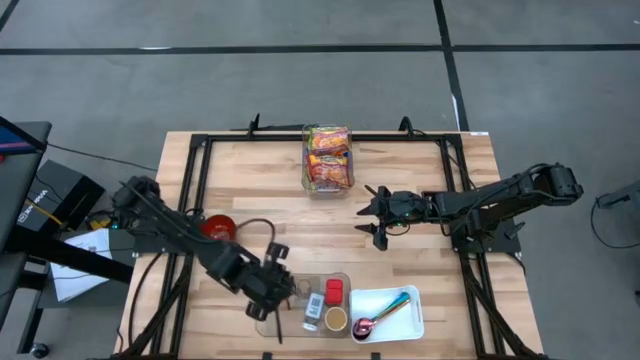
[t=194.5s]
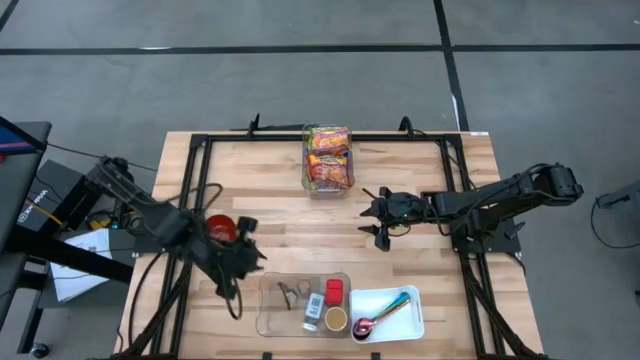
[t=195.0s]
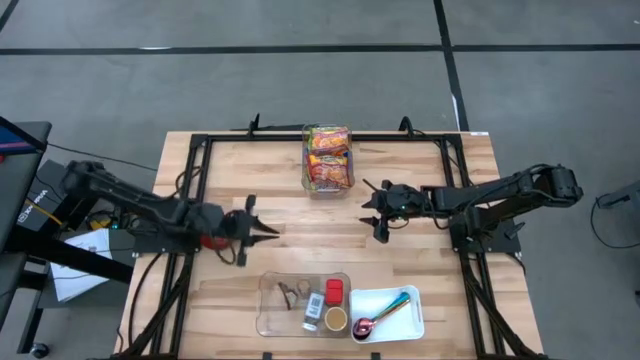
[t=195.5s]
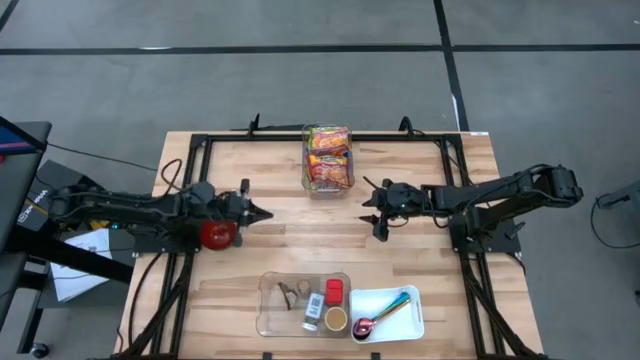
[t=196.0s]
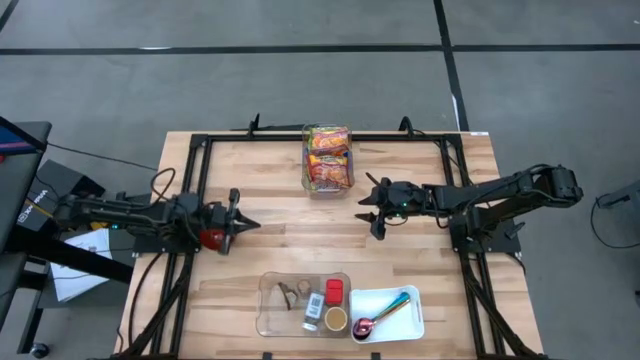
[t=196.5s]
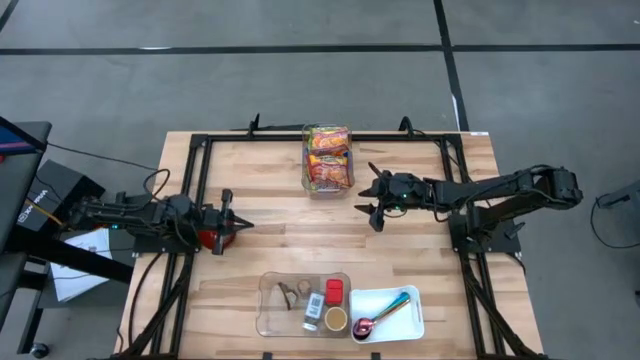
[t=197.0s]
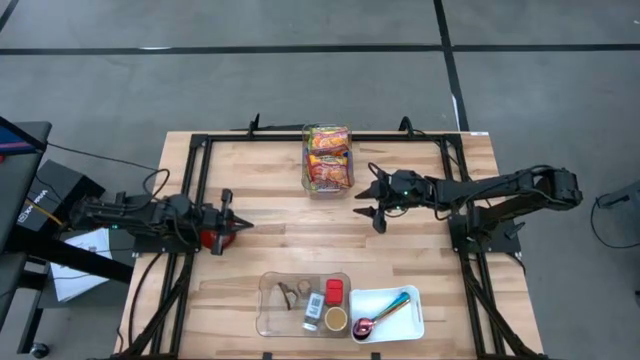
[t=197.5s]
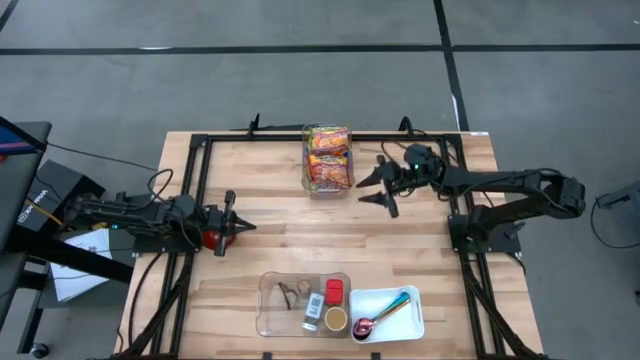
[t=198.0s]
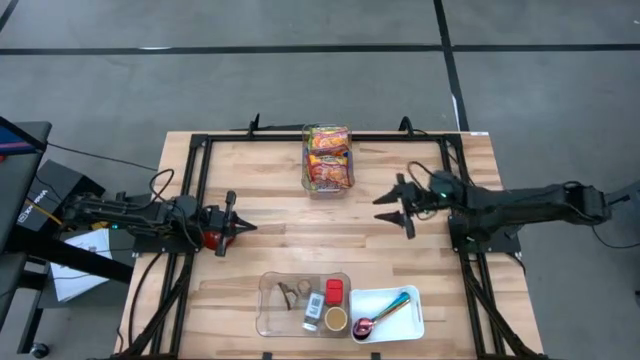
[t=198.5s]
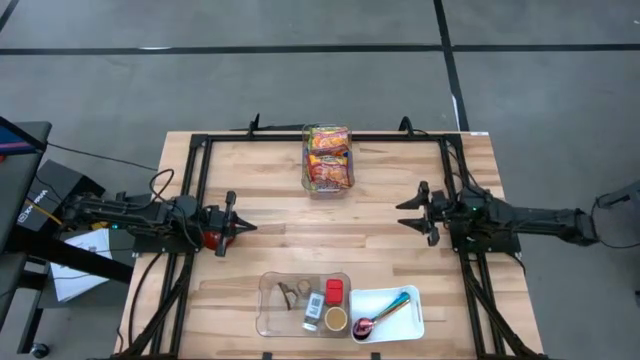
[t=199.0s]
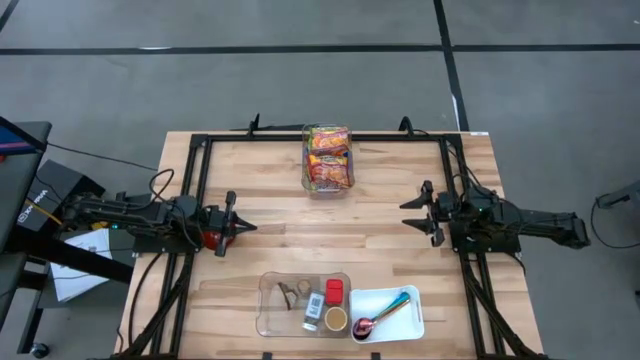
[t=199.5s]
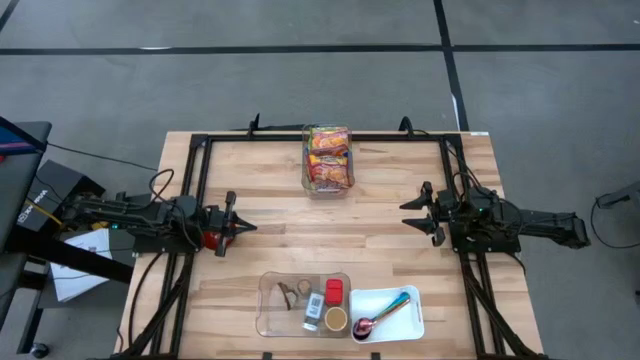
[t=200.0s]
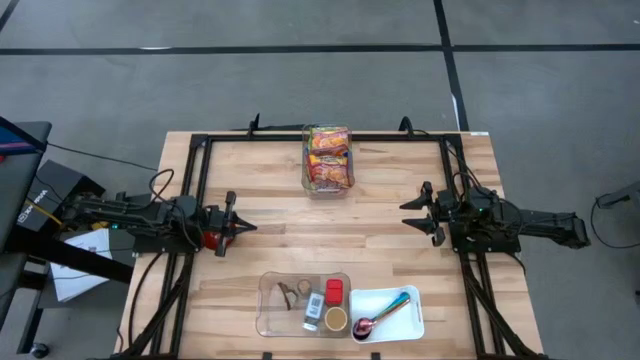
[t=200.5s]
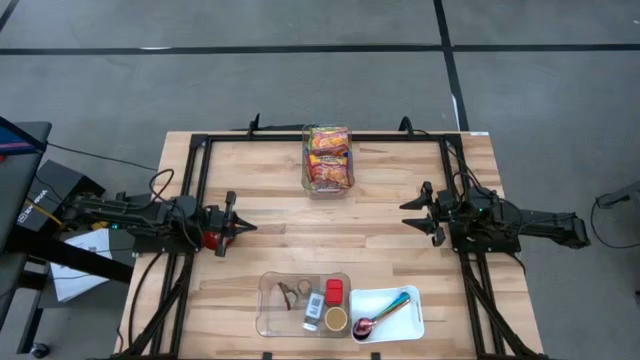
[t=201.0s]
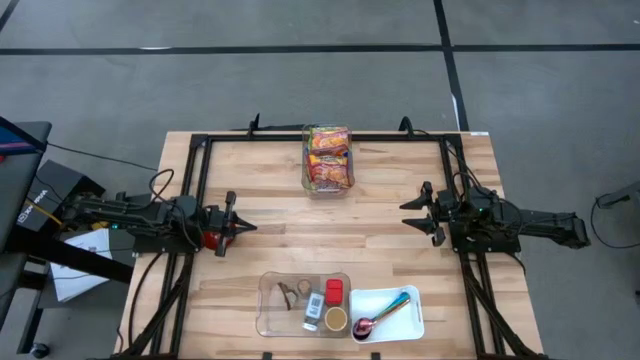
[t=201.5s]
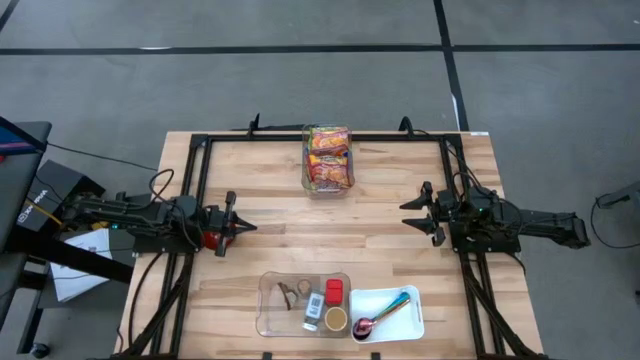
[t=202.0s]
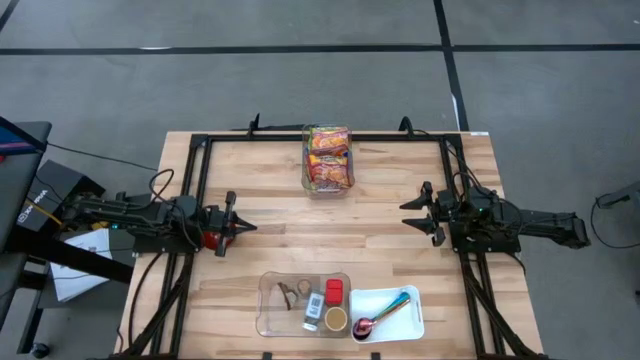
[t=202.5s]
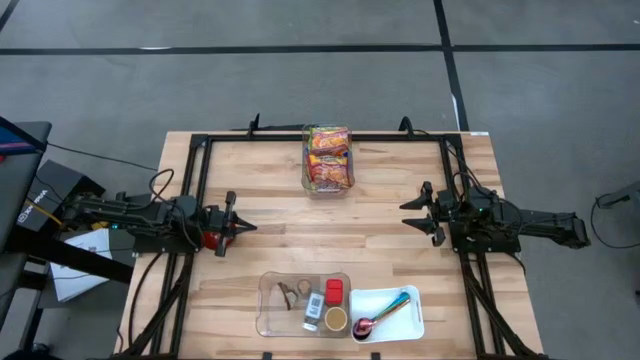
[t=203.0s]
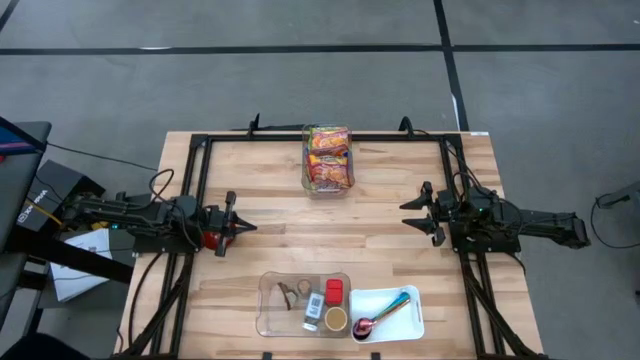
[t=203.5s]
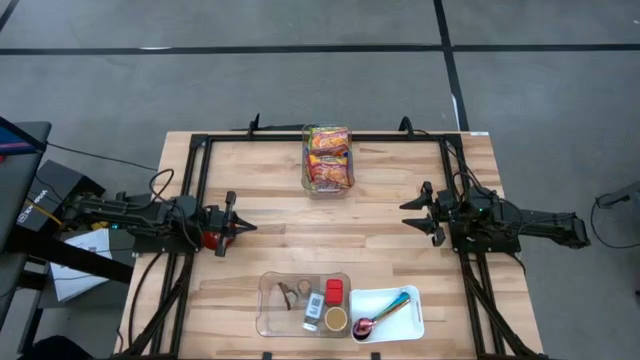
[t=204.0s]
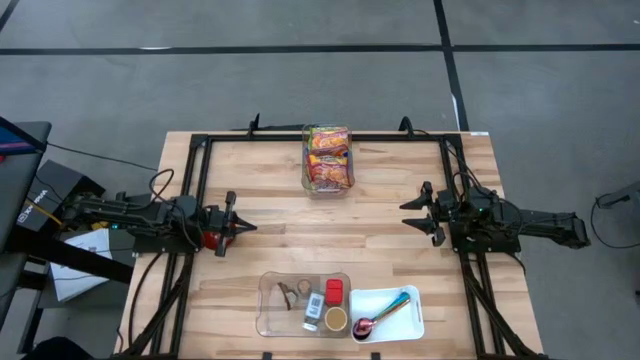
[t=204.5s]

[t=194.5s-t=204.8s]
Task: Pick & Place Food Item
Return to Home Position

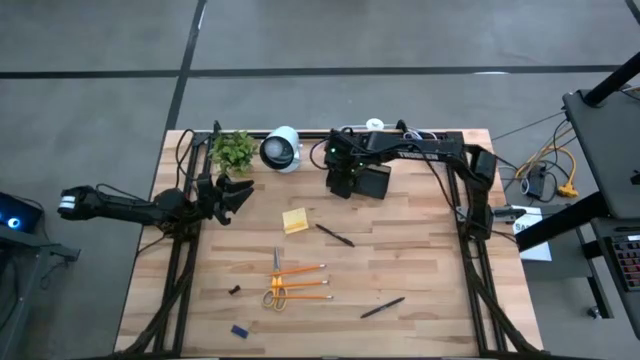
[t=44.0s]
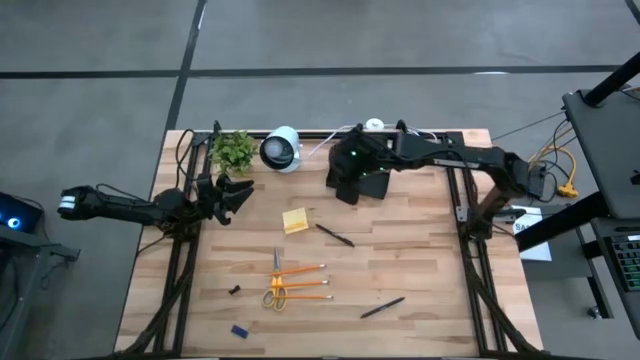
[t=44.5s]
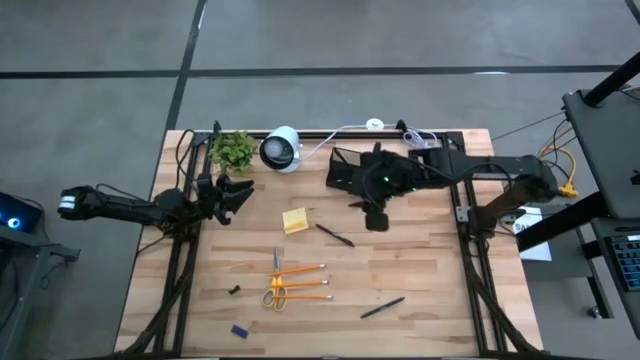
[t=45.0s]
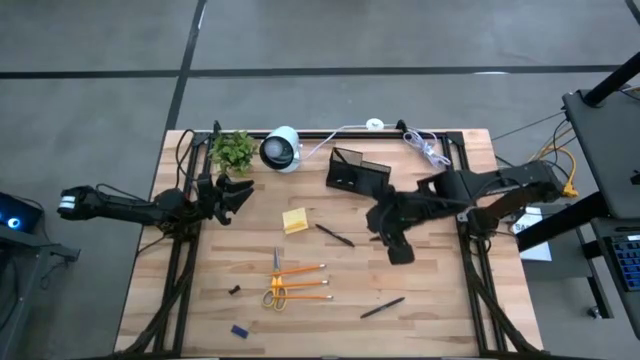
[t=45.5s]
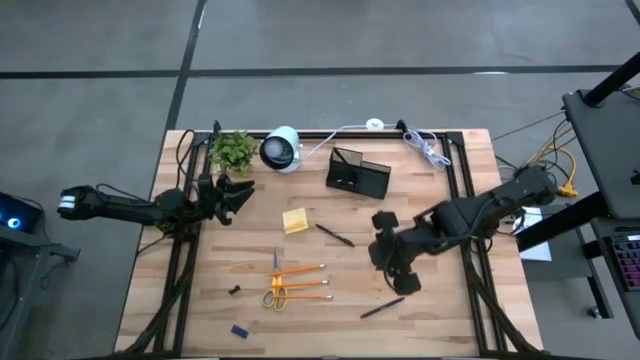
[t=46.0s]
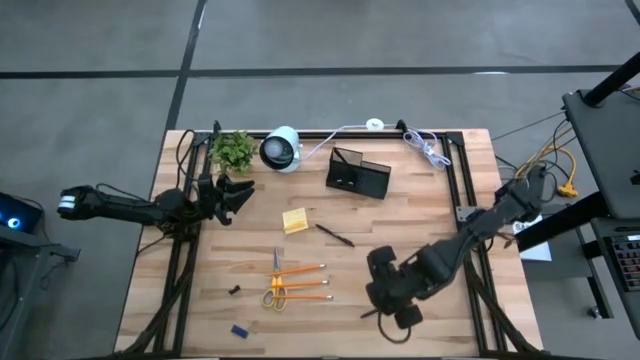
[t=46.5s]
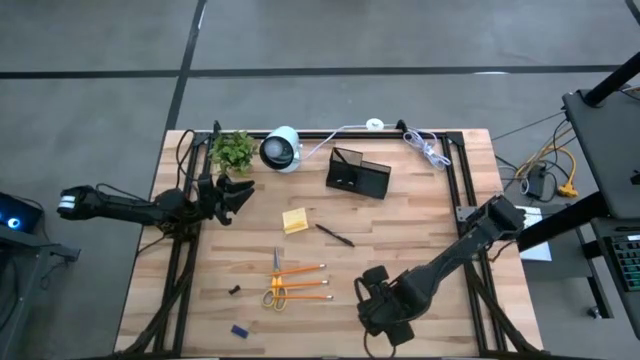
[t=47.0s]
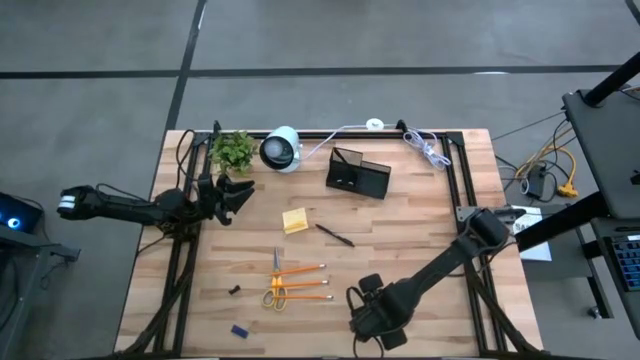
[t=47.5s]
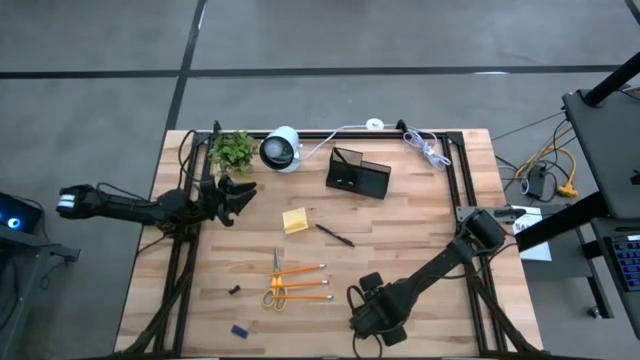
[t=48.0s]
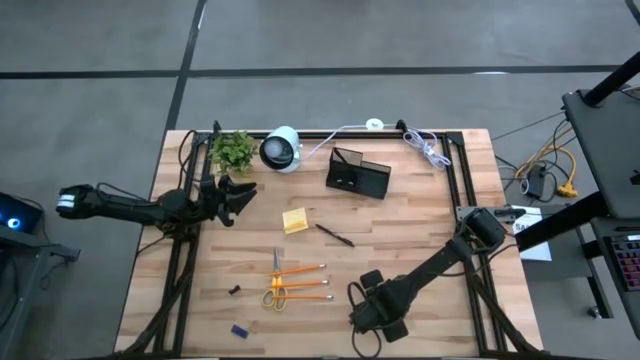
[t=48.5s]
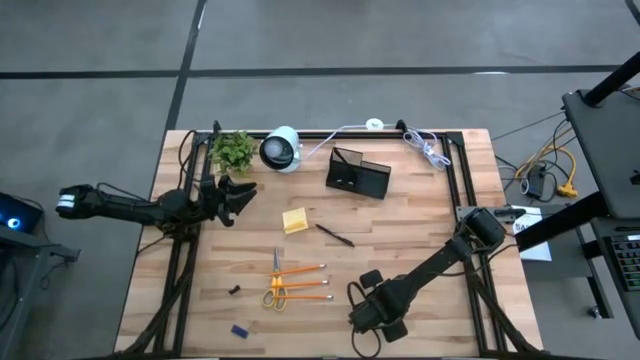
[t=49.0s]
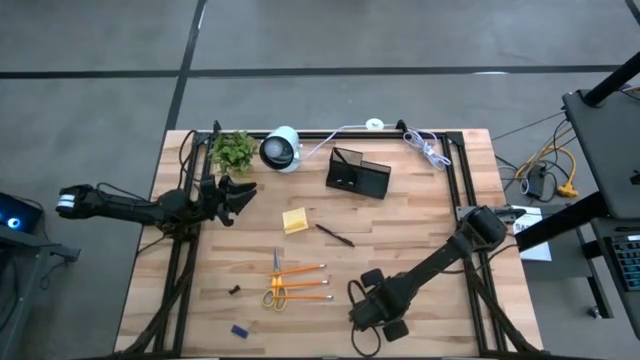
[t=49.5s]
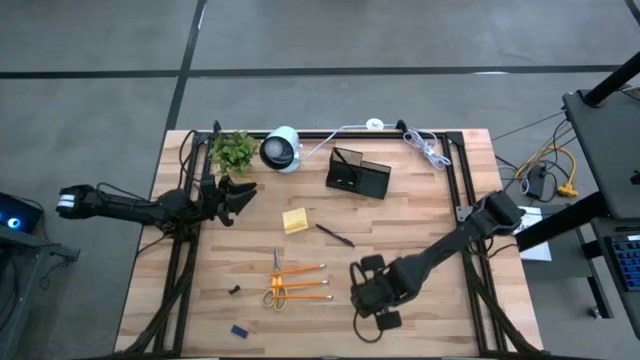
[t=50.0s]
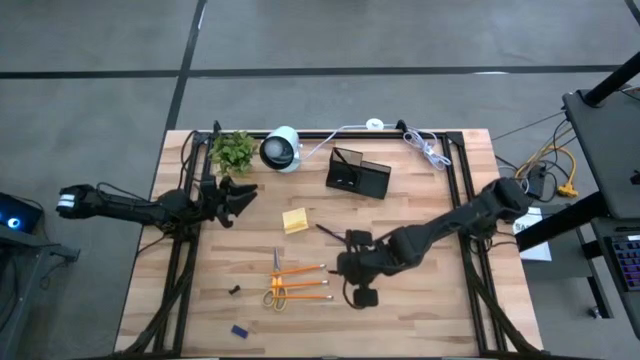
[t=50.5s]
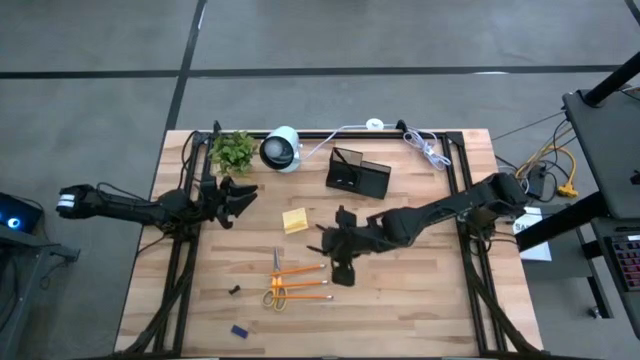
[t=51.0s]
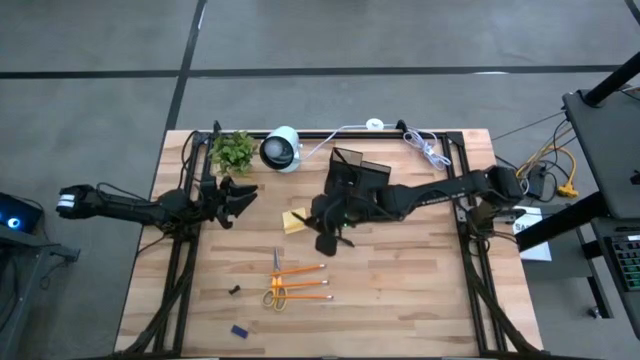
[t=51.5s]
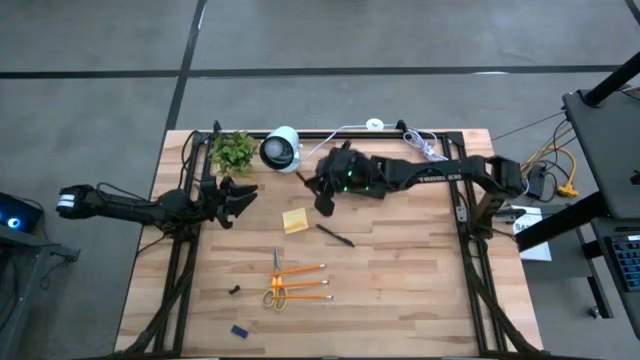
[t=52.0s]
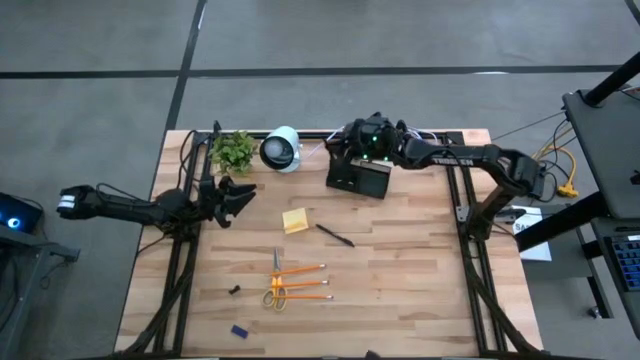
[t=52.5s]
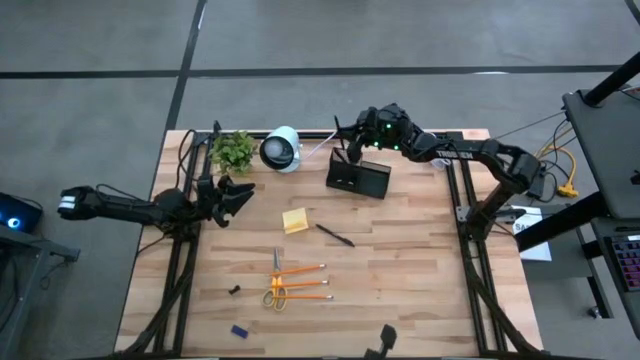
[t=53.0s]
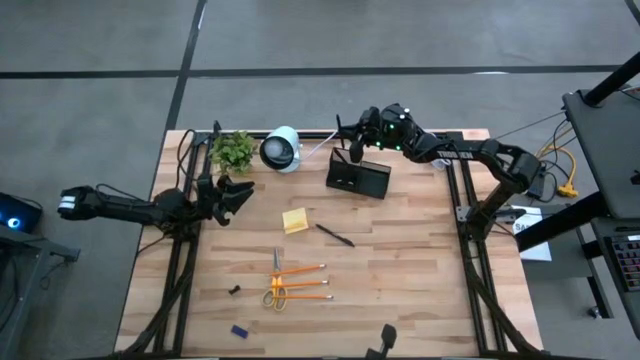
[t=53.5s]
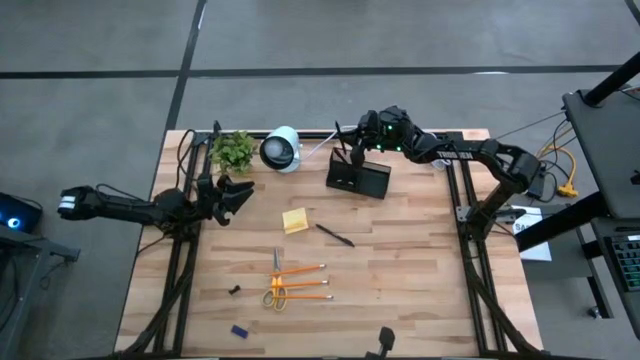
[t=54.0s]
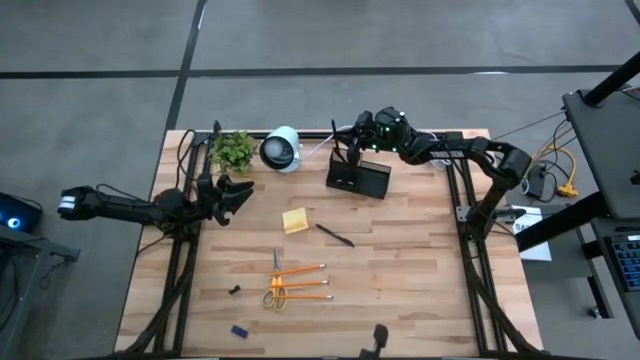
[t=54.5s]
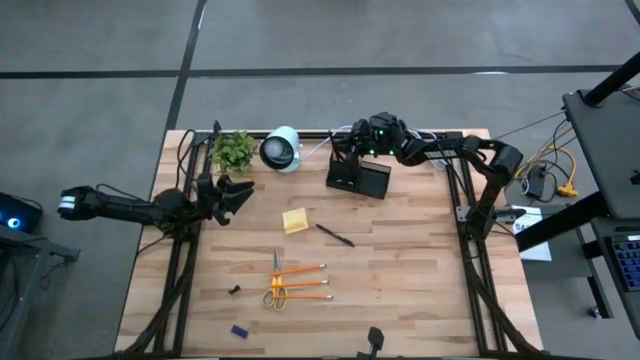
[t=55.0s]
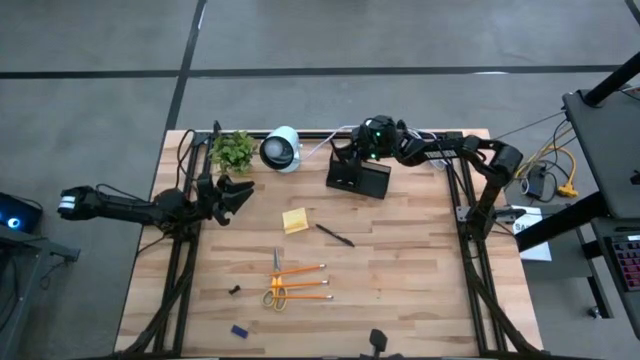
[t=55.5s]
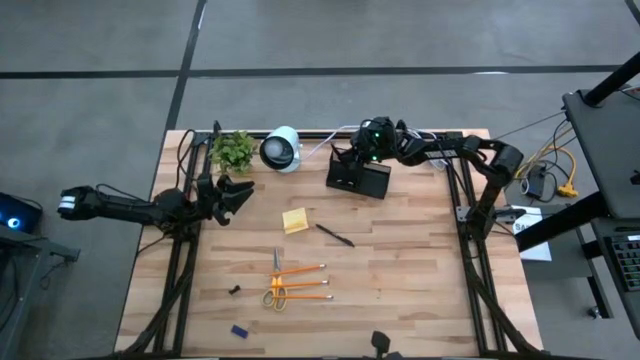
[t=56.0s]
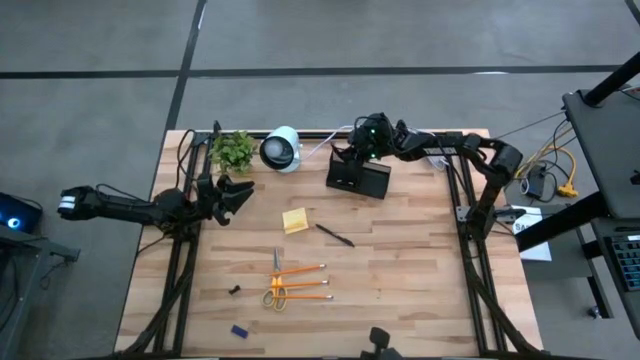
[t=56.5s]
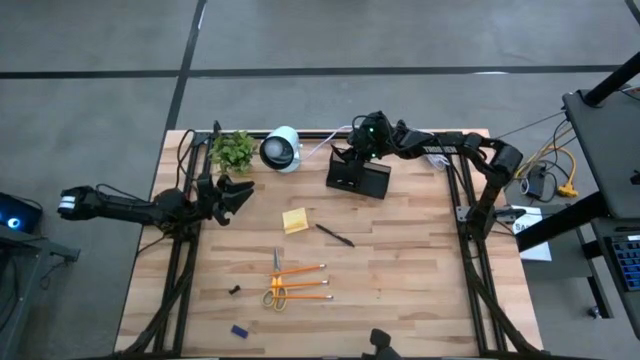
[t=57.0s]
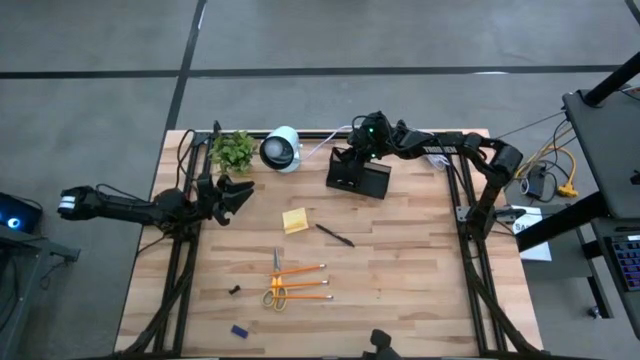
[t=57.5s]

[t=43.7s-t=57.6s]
Task: Pick and place office supplies into organizer
Put the bottom pen into the desk organizer
